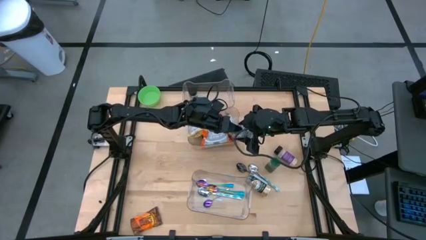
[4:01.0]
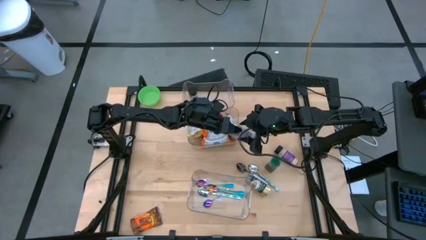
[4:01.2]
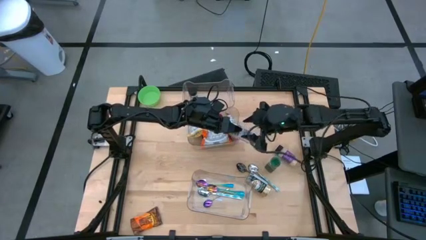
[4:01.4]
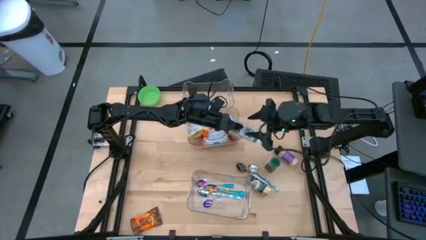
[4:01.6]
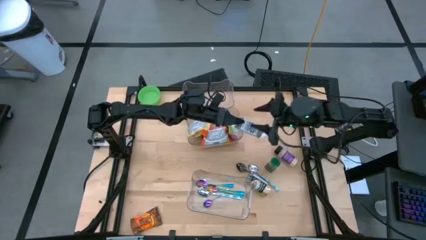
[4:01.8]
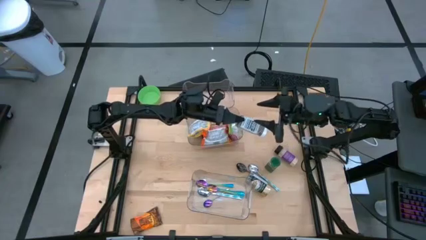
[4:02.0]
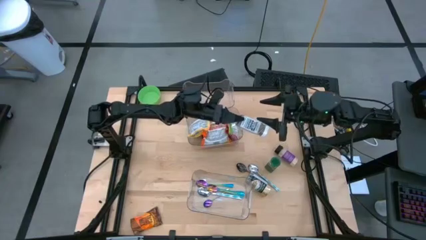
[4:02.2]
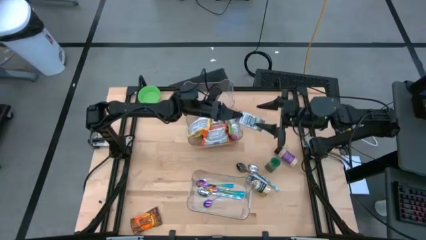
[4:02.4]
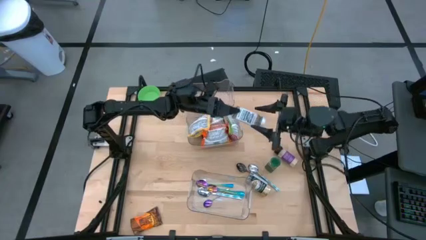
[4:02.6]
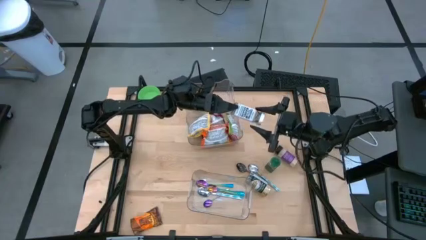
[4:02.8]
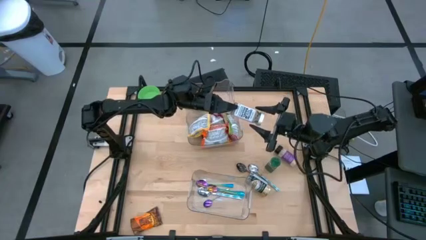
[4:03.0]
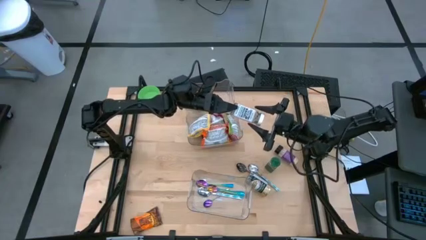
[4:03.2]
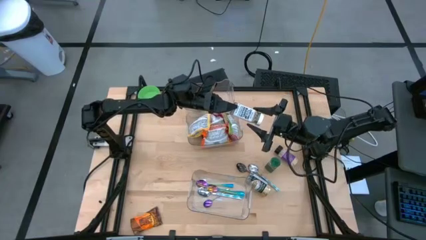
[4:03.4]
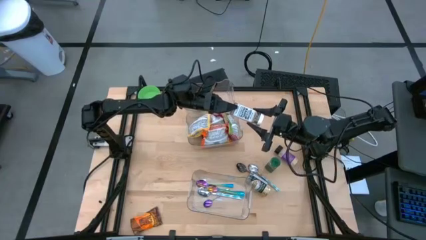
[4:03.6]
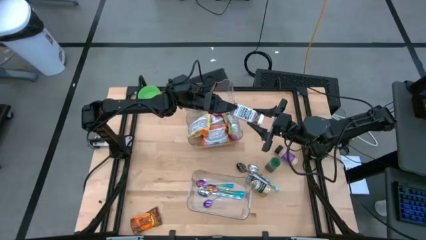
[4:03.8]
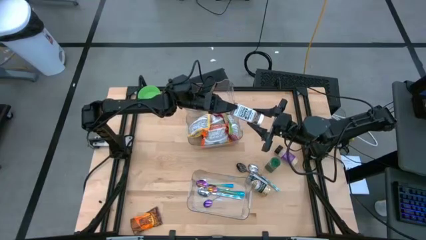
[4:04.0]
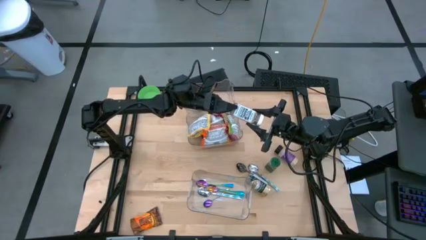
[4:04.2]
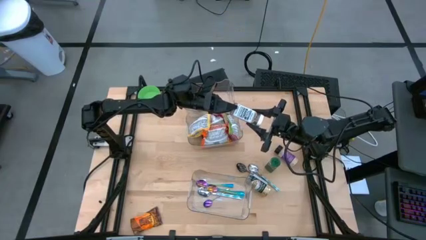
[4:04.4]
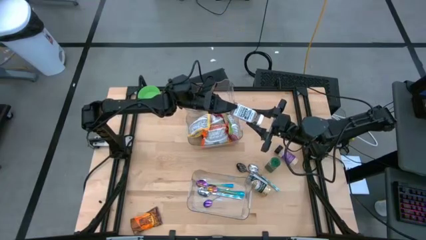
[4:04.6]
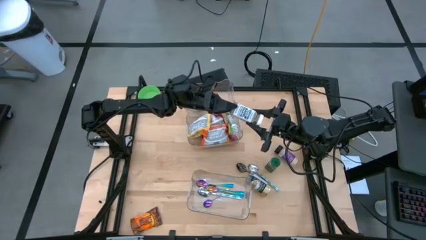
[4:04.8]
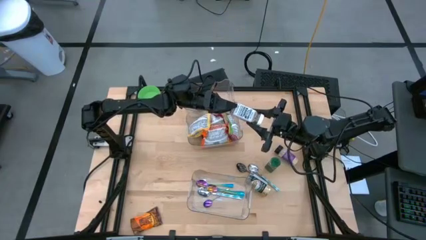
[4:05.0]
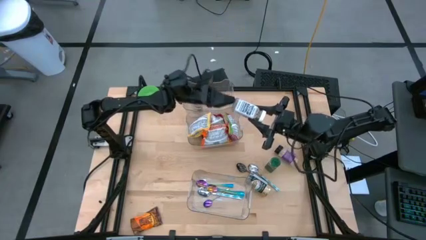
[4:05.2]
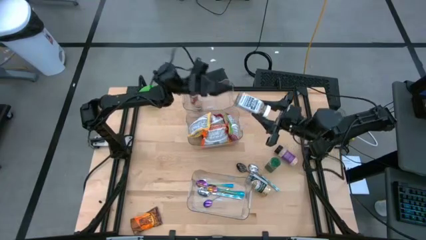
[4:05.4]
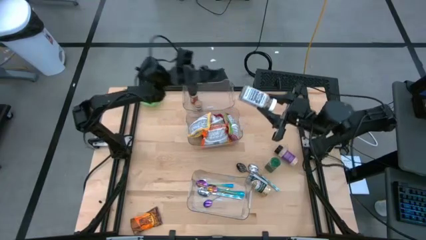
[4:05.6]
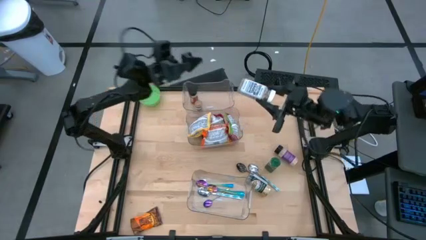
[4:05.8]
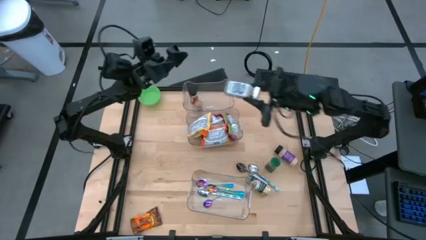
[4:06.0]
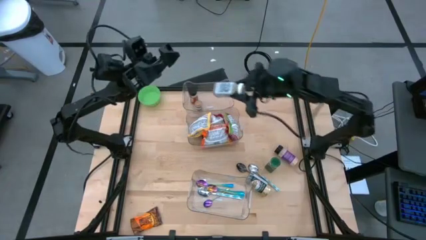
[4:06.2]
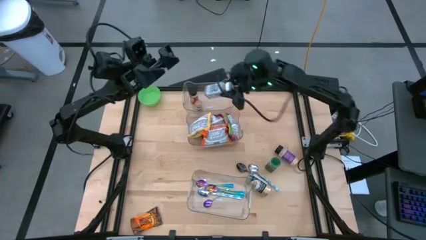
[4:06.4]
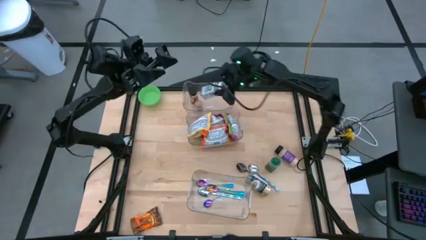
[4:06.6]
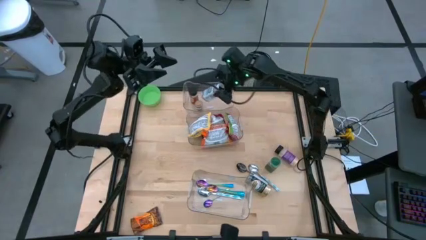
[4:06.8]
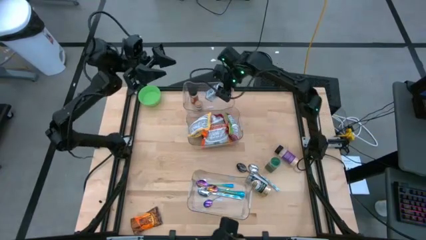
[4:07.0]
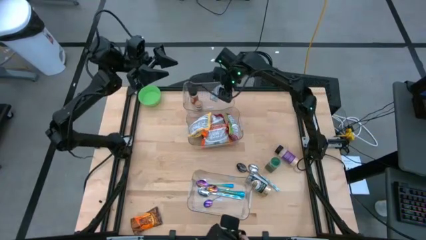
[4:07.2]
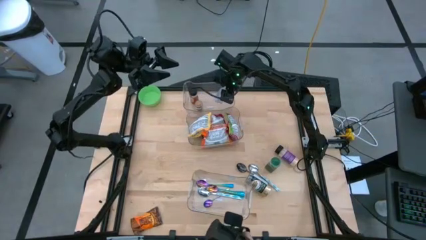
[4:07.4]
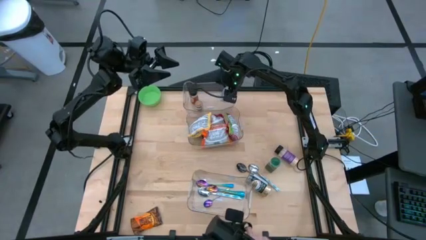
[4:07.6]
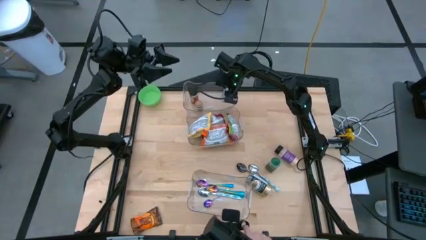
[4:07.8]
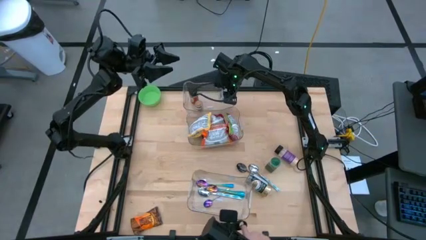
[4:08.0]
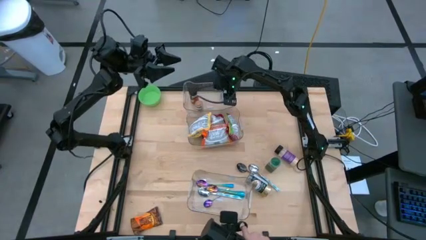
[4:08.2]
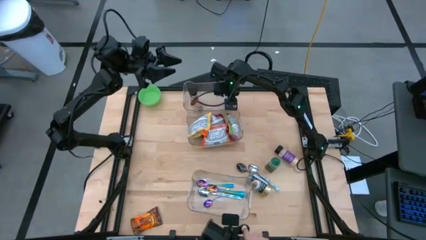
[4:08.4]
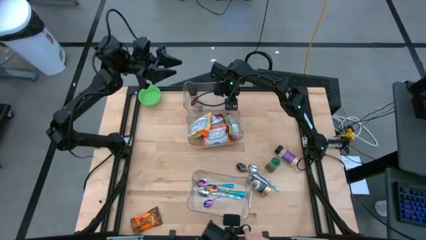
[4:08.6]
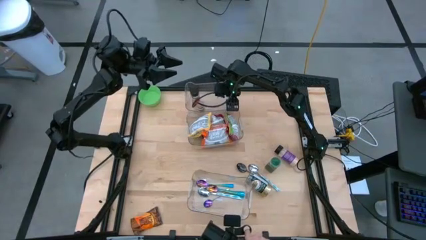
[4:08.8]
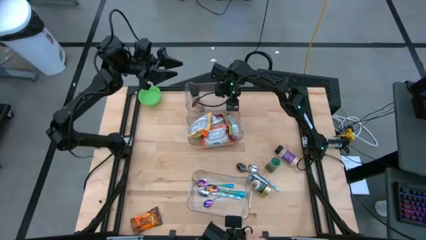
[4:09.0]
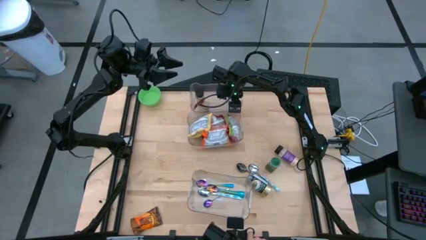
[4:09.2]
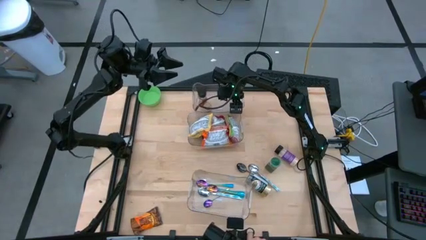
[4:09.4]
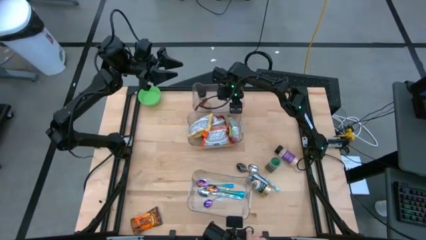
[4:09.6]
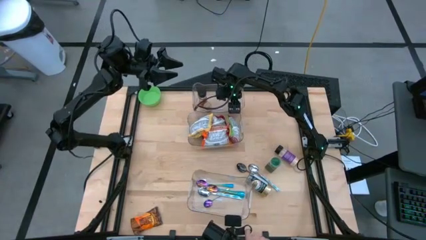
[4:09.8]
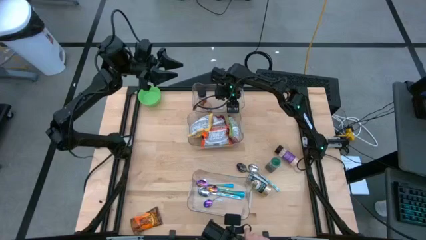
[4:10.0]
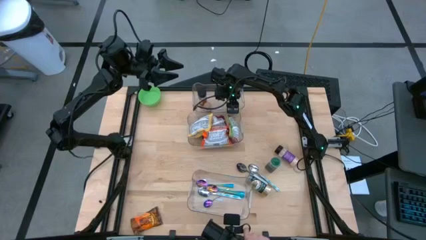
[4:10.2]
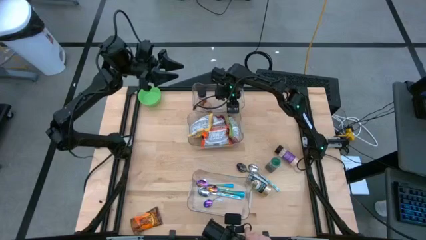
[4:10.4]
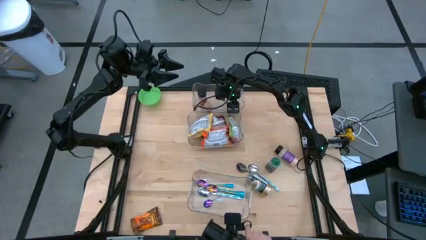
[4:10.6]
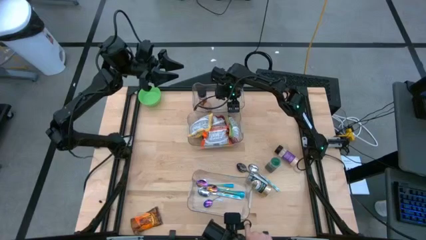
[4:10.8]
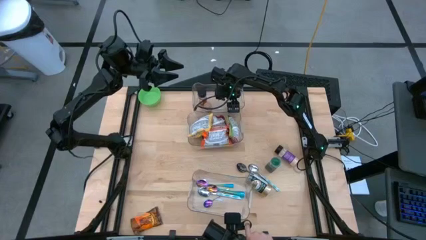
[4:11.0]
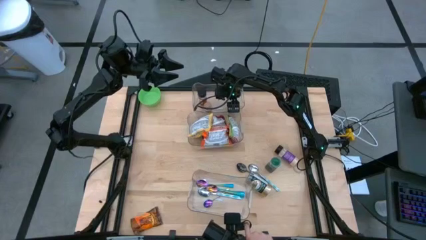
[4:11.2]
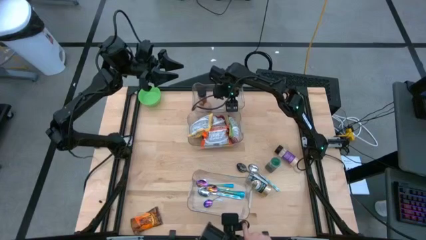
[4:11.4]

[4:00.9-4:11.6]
Task: Pick & Place Food Item
Put the white seasoning bottle into the top transparent bin
